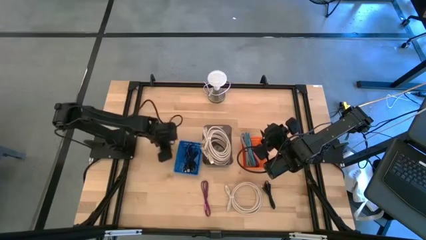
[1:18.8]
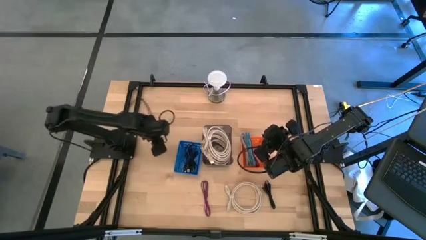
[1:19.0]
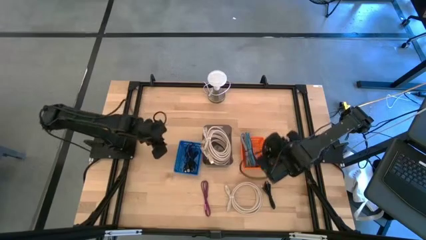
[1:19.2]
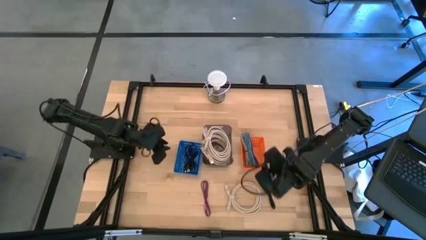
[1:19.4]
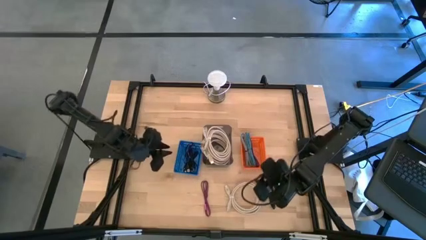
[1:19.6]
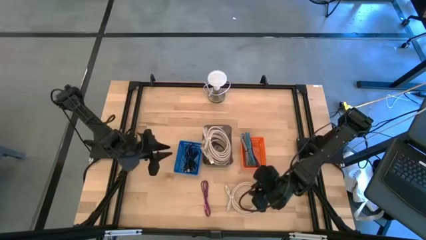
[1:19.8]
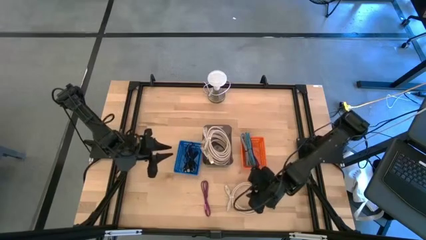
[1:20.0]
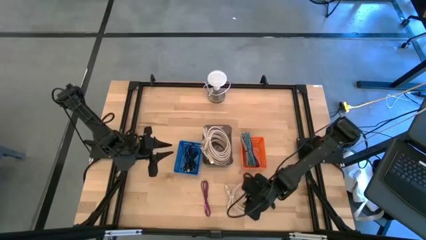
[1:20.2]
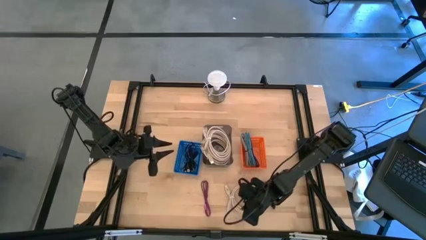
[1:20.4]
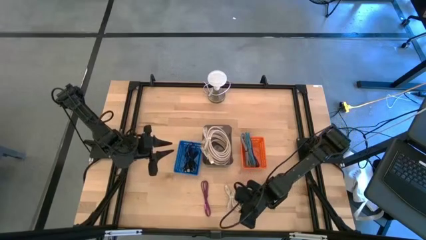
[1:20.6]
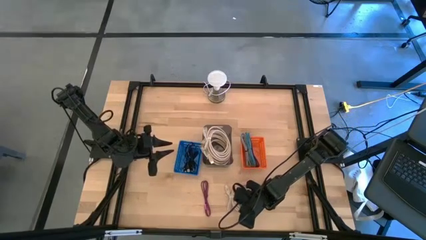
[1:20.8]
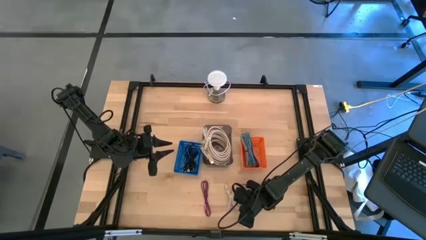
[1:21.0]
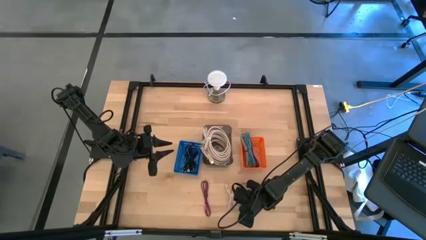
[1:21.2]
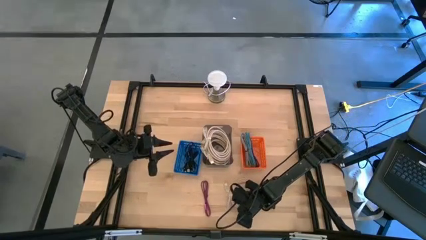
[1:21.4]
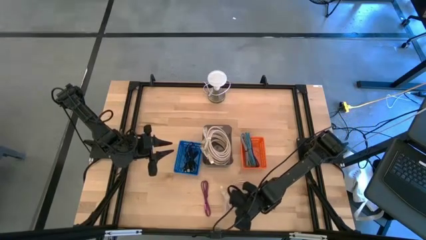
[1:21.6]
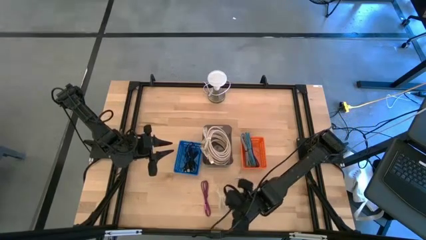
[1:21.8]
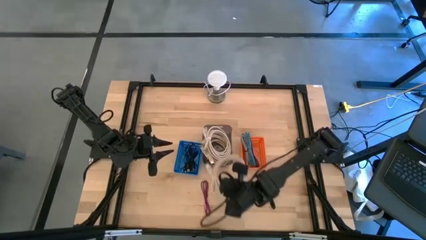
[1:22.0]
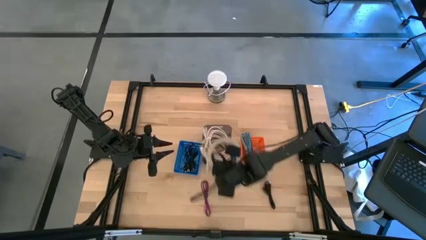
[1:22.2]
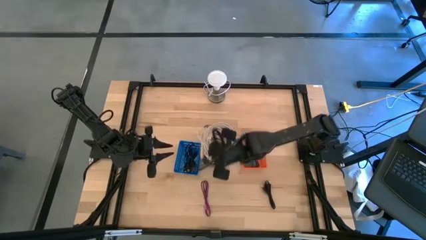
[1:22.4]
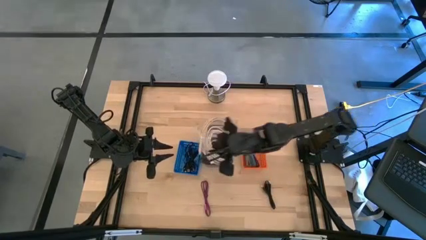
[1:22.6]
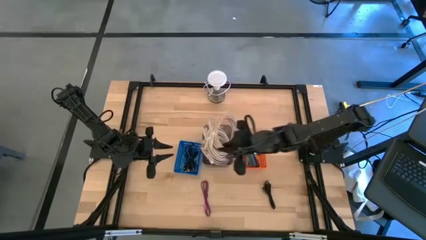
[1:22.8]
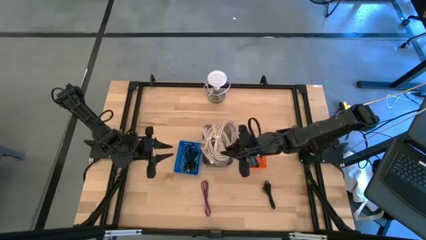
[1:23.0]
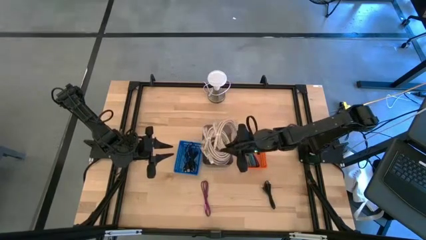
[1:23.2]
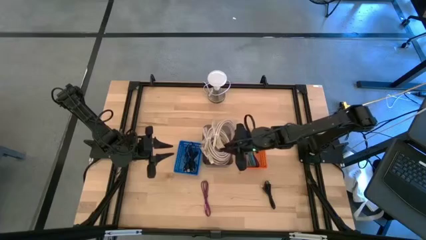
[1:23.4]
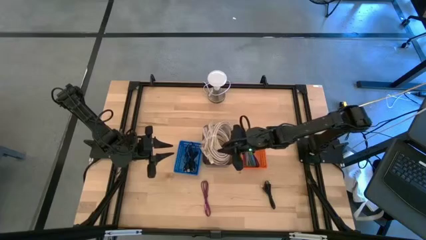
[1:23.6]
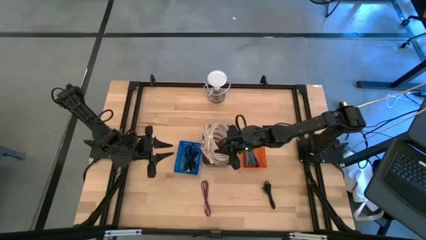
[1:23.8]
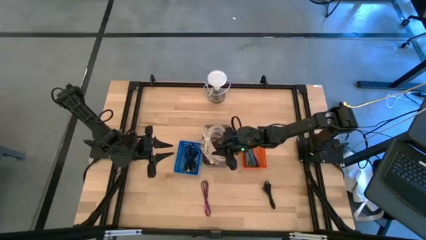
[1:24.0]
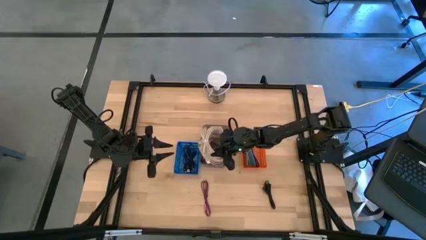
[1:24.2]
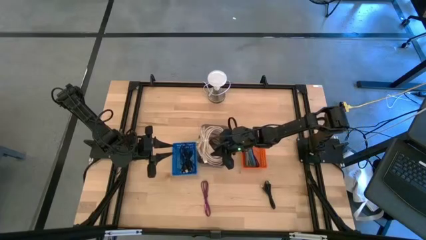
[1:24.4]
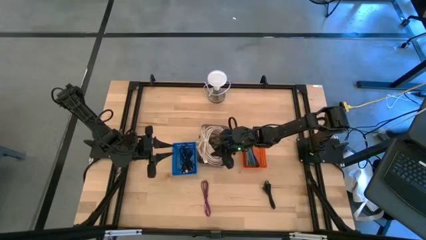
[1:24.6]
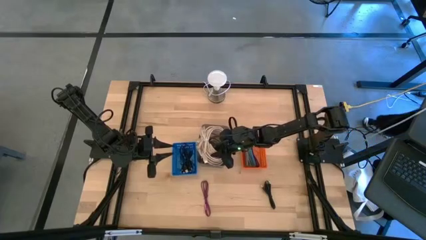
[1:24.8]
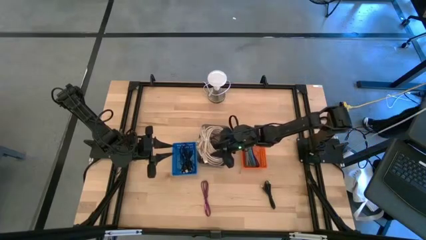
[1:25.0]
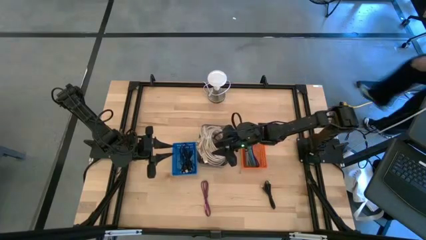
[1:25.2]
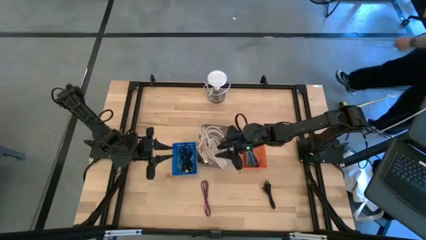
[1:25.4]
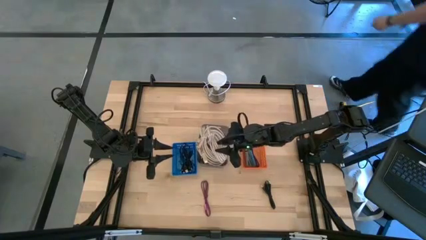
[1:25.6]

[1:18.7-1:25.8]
Task: Pick & Place USB Port
Put the brown HDMI cable into the black bin

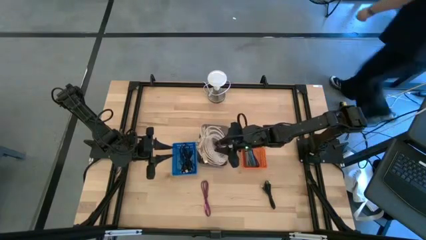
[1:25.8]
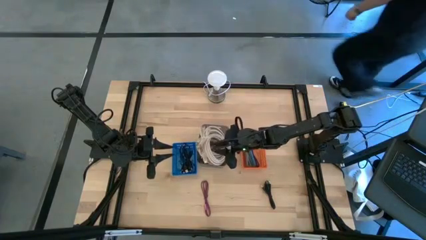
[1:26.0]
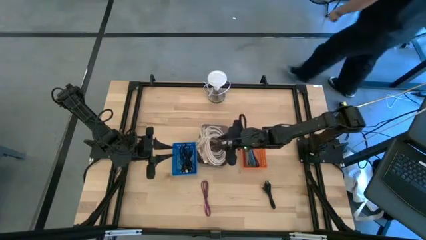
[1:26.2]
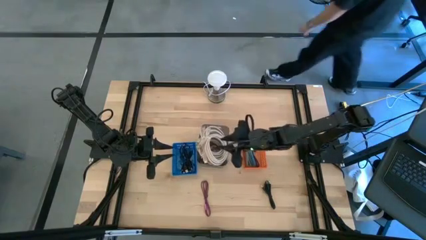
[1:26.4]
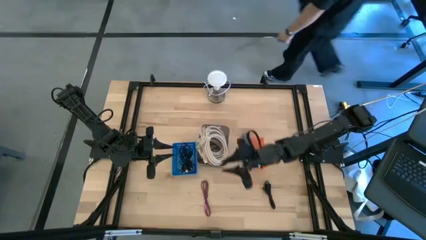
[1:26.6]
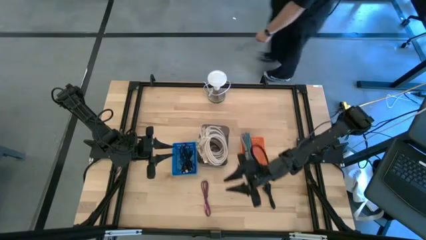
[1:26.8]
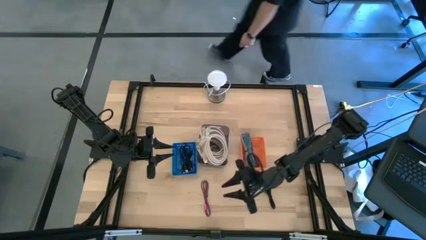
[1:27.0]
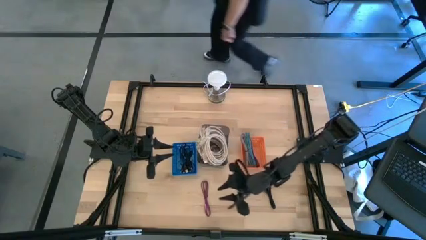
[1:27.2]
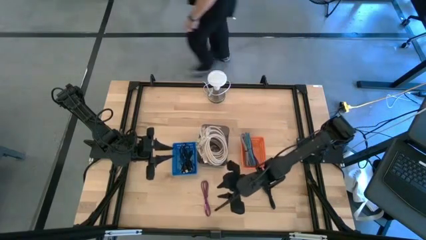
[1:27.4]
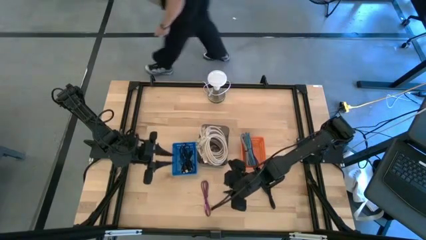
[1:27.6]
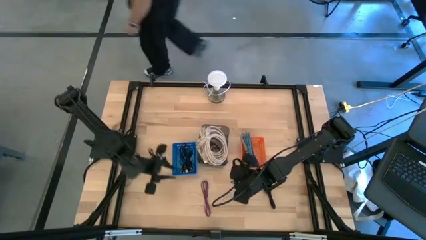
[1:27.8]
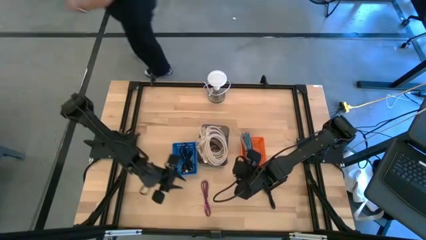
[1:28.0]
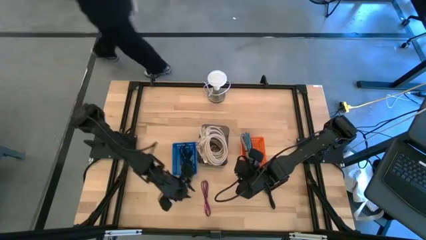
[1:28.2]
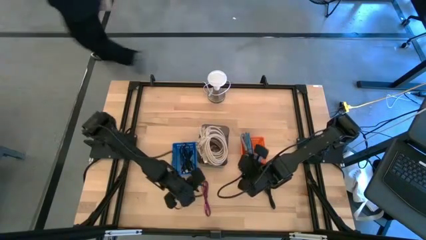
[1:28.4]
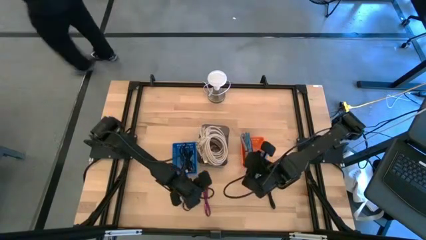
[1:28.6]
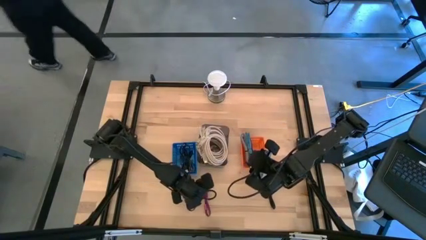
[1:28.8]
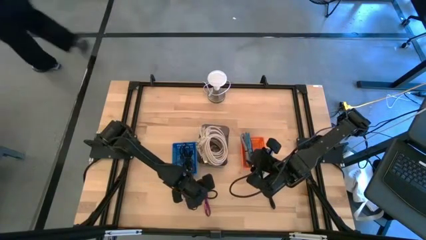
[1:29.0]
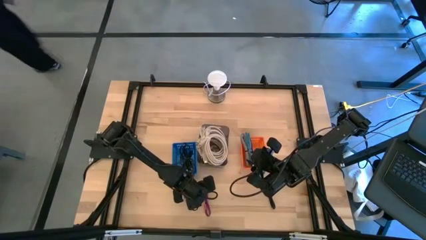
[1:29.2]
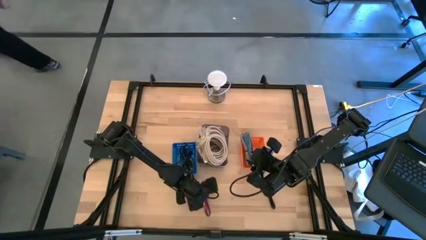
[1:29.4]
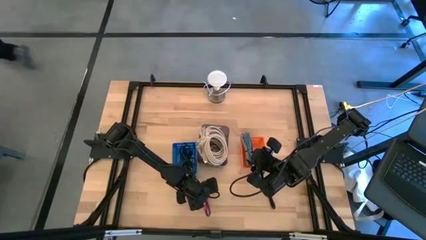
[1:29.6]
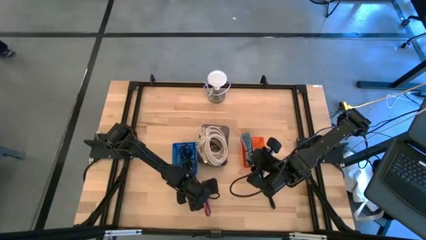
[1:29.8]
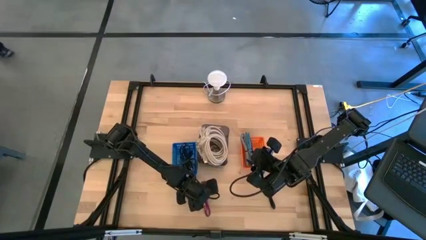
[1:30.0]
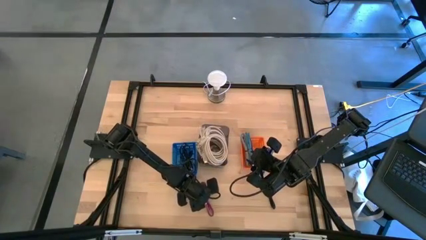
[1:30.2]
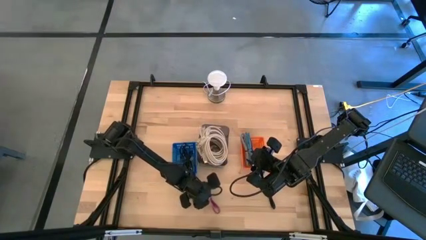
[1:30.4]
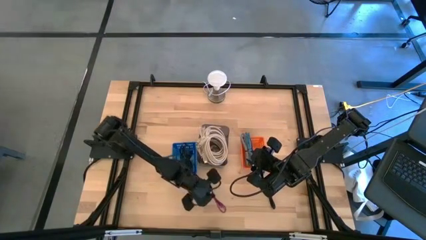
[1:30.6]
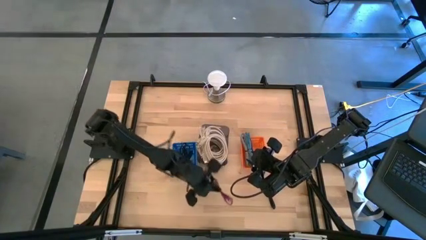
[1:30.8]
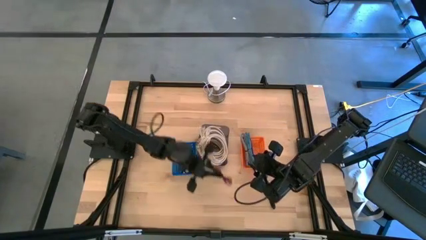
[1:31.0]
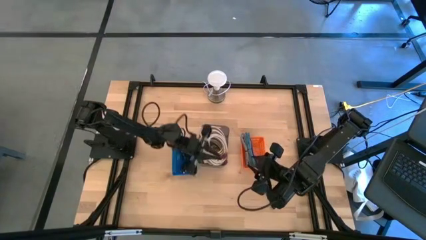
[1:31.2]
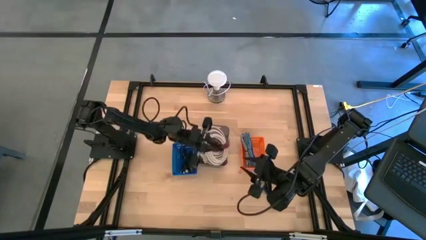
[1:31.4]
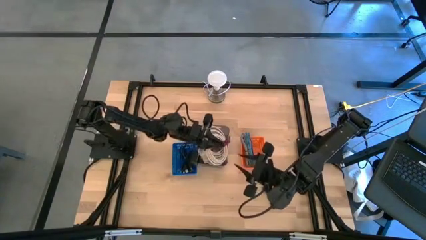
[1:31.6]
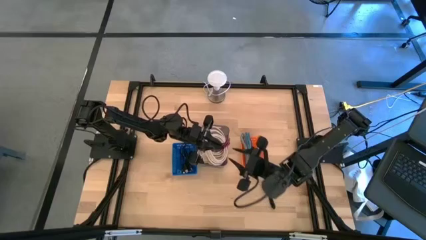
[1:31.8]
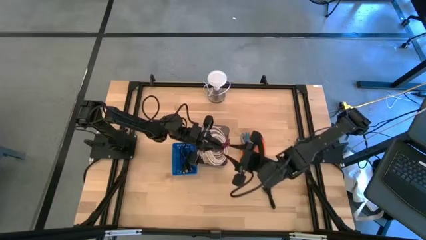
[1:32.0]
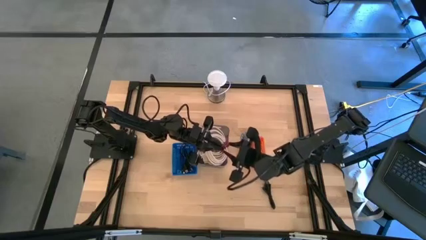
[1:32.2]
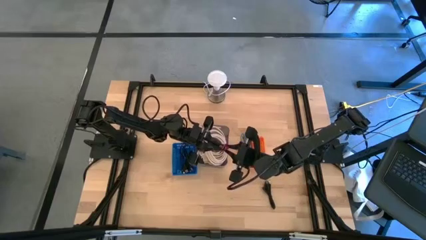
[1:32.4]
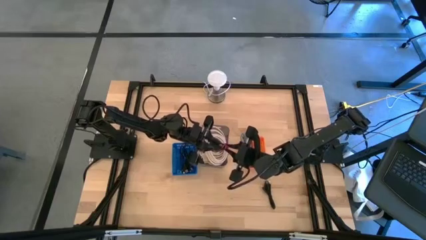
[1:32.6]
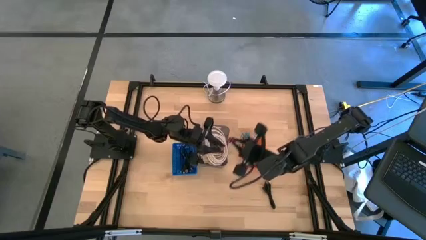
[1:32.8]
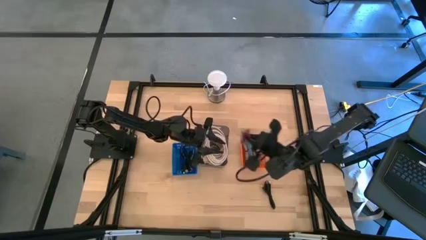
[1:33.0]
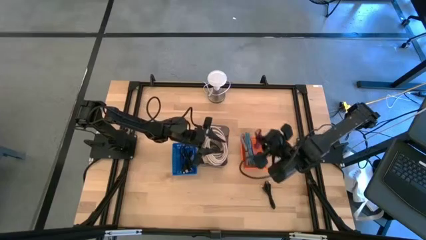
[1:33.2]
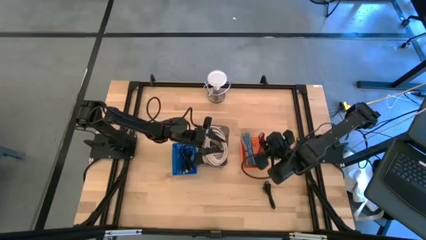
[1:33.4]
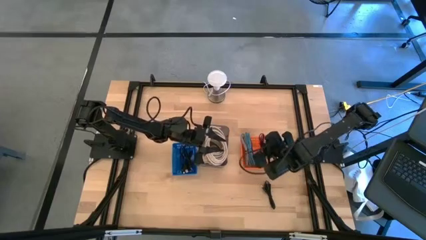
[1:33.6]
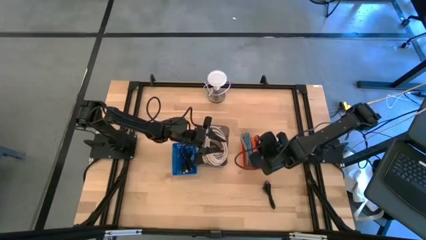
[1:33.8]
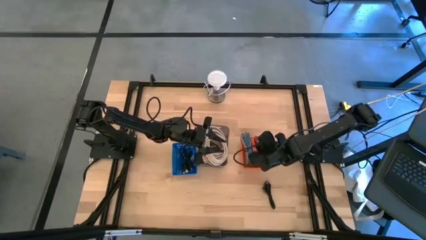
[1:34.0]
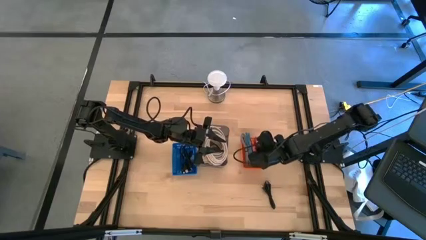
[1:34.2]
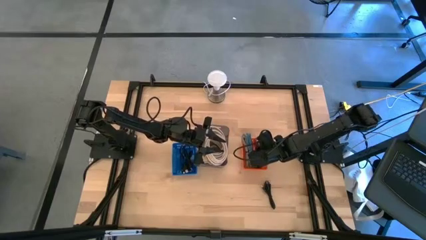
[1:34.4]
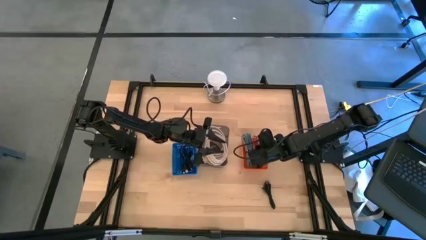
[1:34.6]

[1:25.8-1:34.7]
Put the pink charger cable into the orange bin

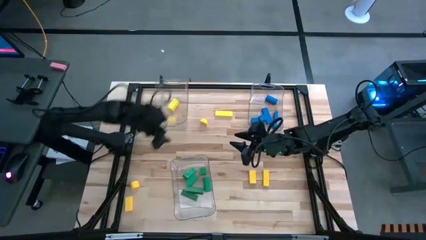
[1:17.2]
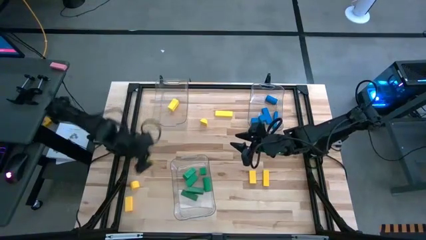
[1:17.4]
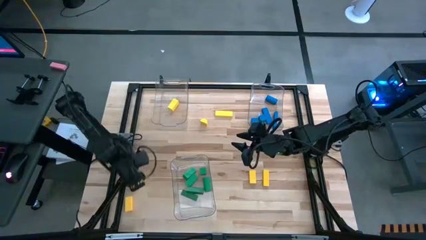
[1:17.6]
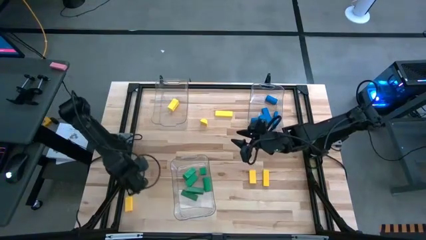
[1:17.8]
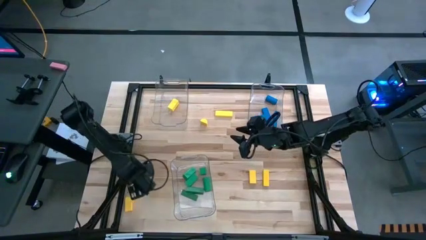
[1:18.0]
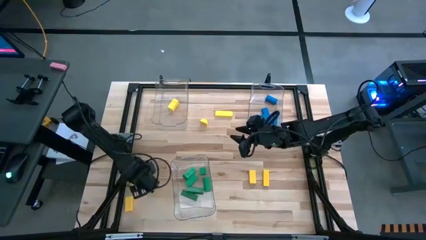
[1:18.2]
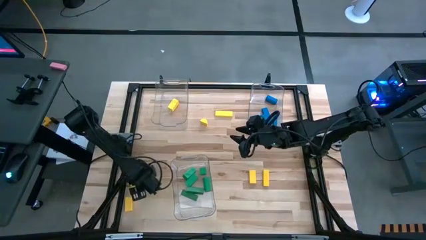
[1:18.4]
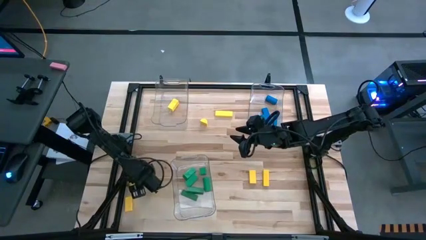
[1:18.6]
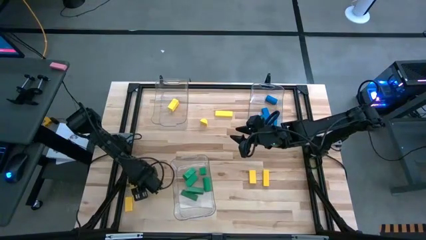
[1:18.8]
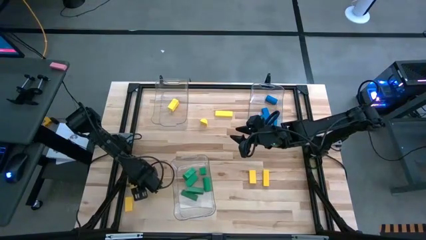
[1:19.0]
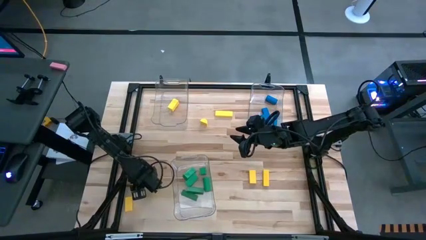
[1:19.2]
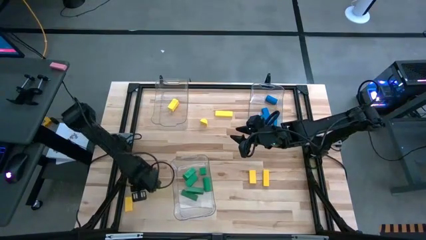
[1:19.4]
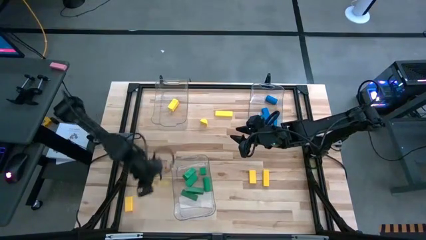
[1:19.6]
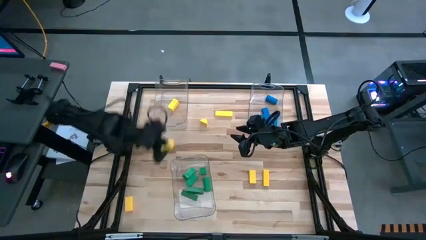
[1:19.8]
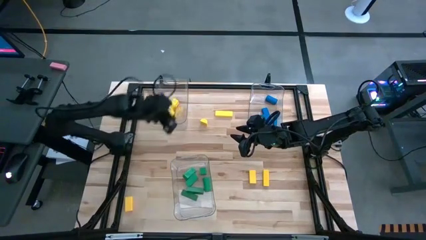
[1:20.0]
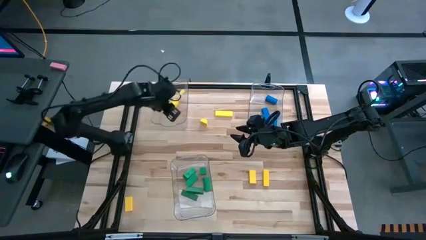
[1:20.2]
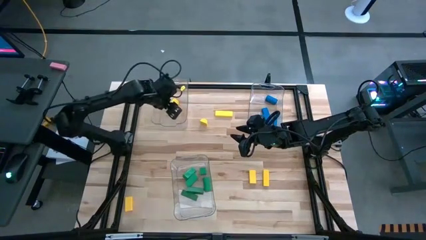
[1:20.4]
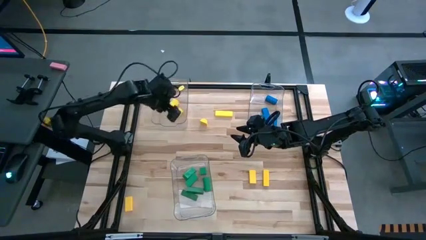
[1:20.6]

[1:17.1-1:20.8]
Task: Sort blocks
Put the yellow block into the top left transparent bin
